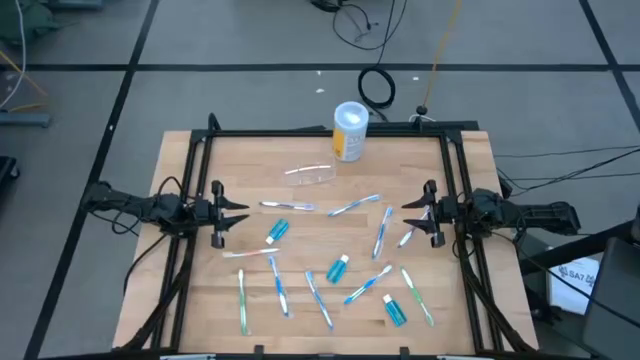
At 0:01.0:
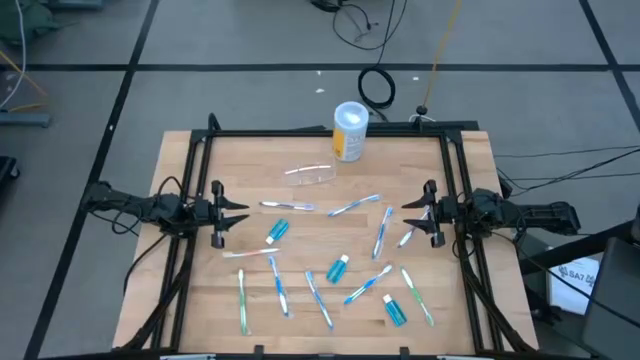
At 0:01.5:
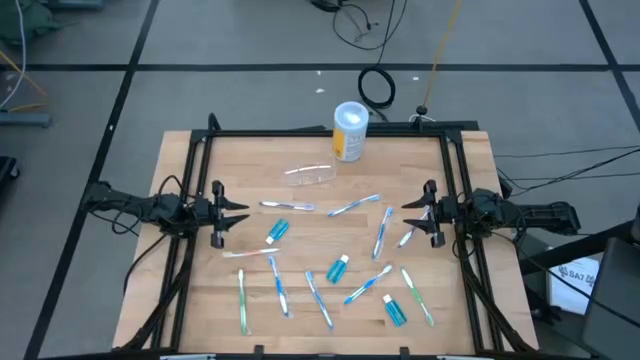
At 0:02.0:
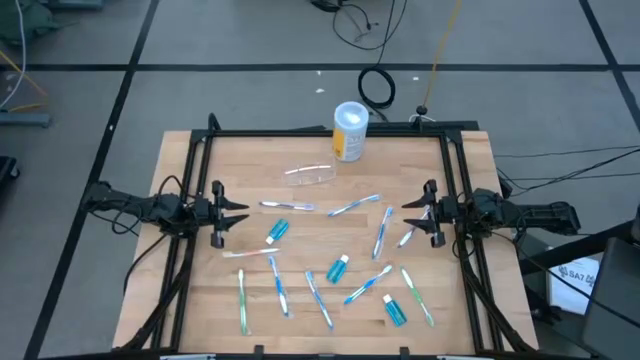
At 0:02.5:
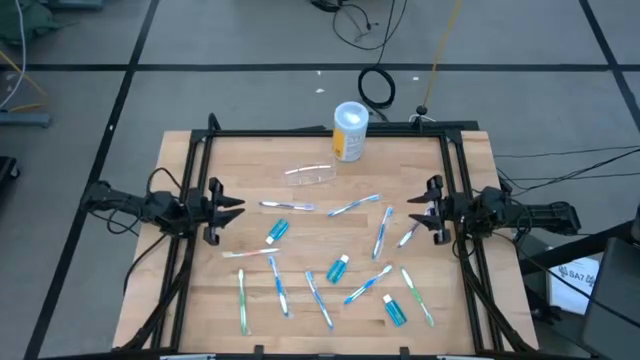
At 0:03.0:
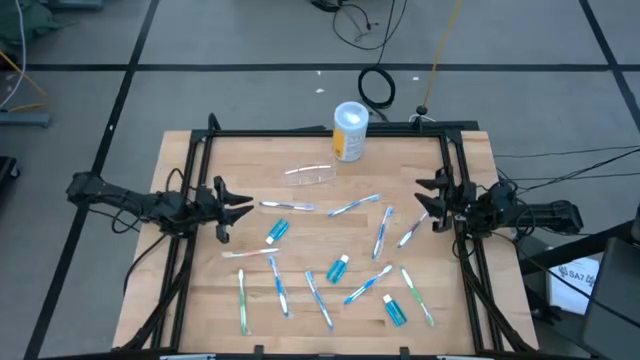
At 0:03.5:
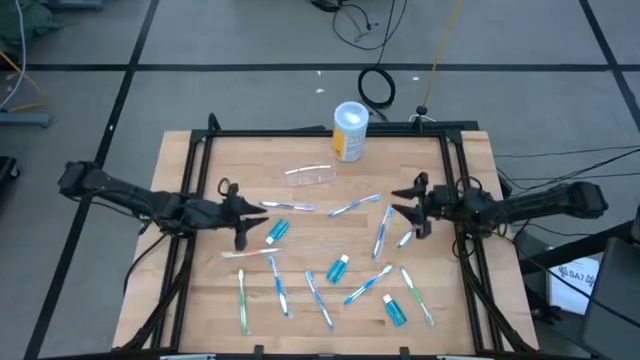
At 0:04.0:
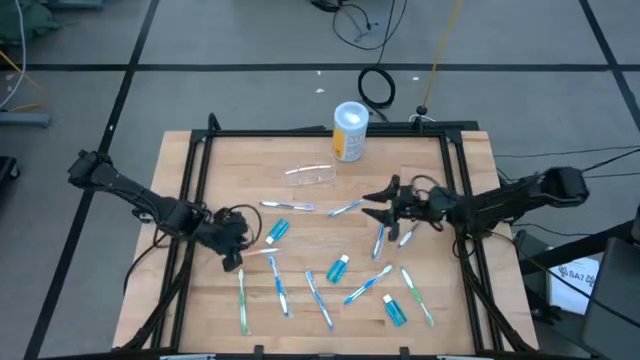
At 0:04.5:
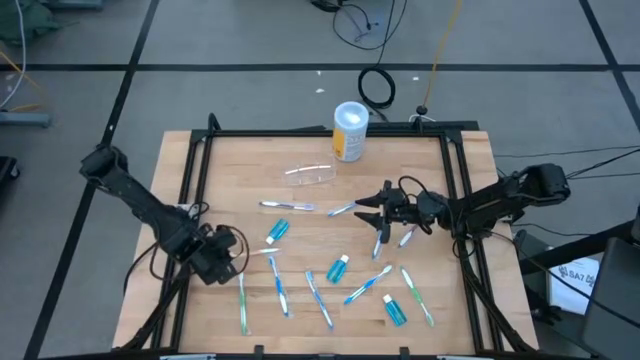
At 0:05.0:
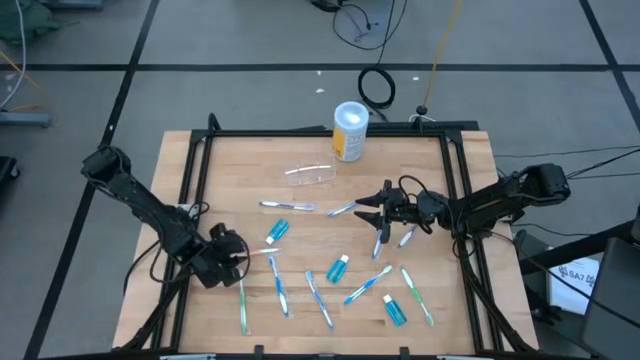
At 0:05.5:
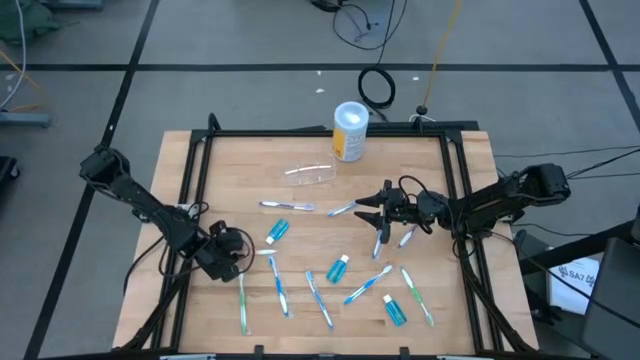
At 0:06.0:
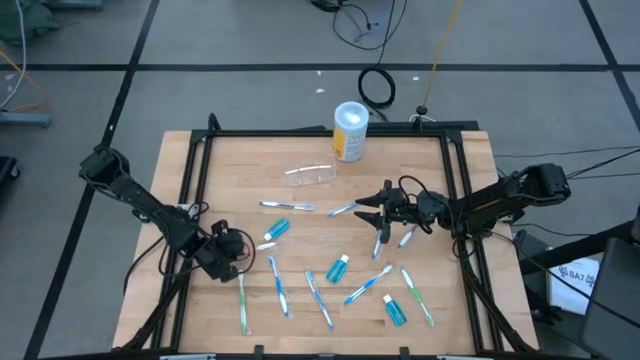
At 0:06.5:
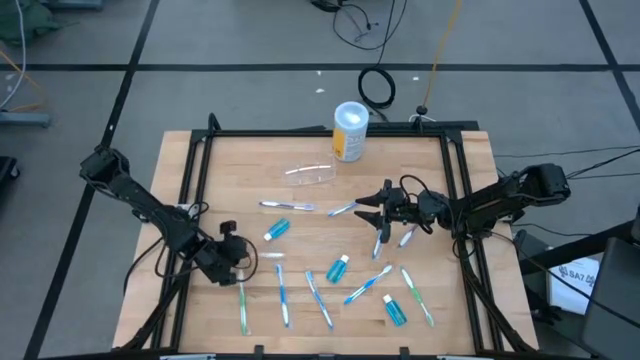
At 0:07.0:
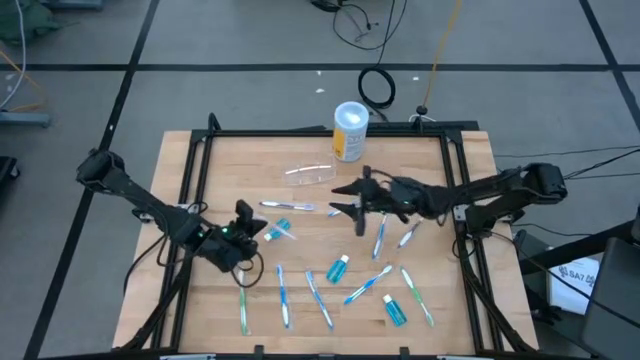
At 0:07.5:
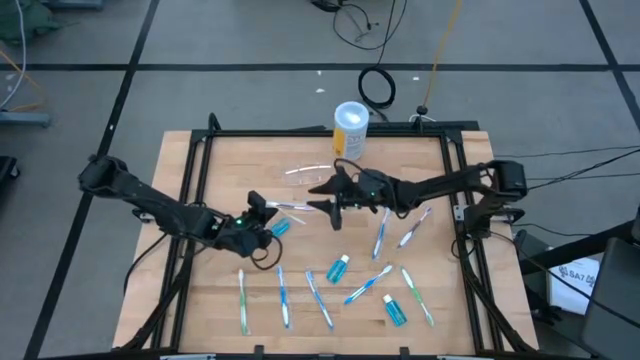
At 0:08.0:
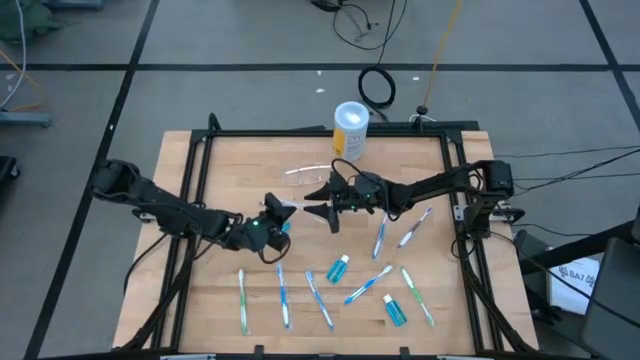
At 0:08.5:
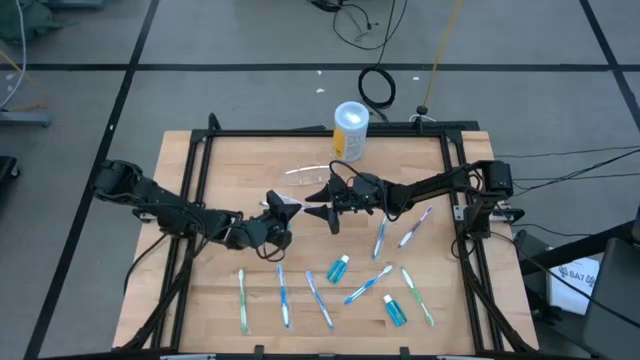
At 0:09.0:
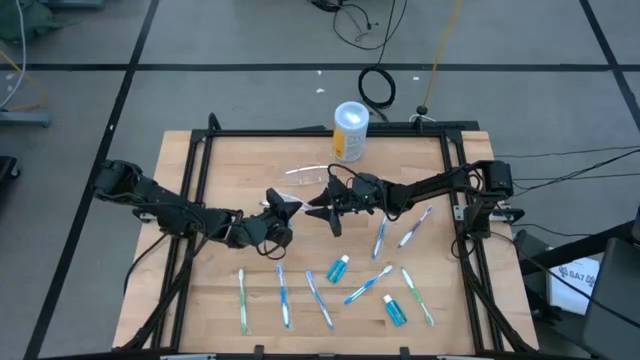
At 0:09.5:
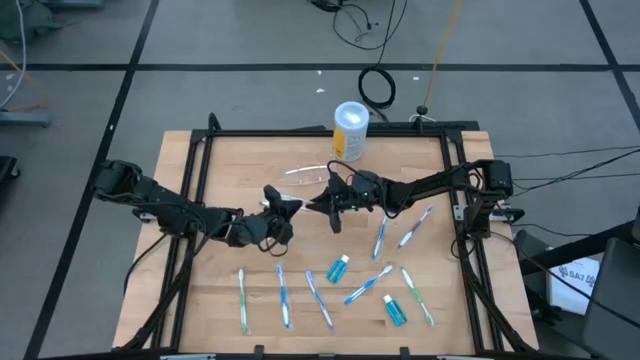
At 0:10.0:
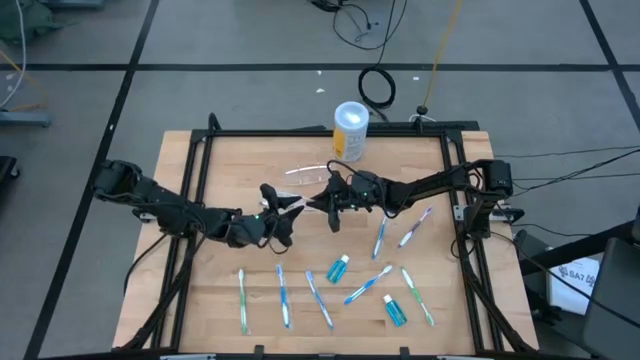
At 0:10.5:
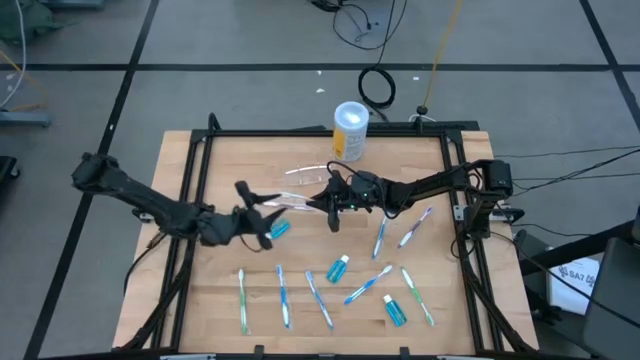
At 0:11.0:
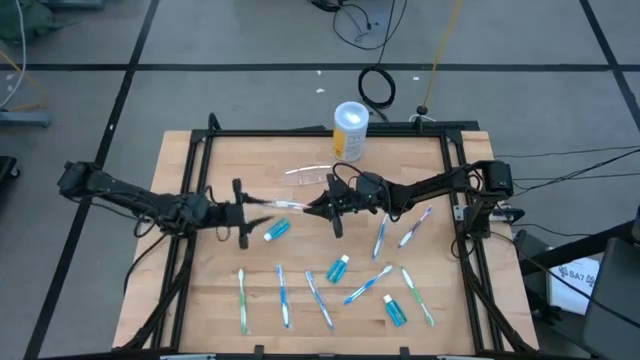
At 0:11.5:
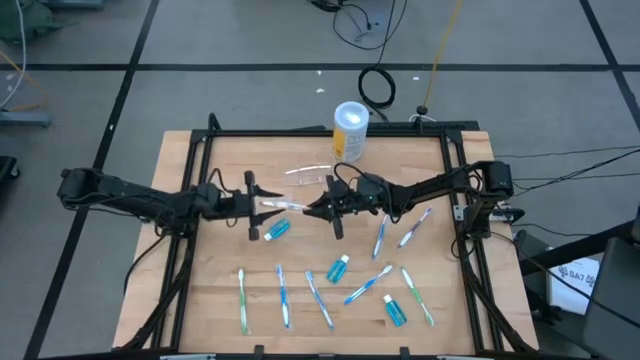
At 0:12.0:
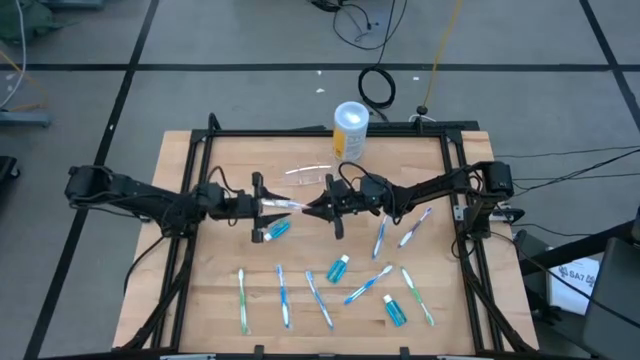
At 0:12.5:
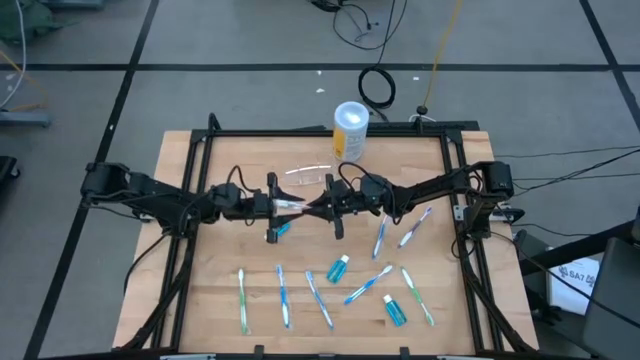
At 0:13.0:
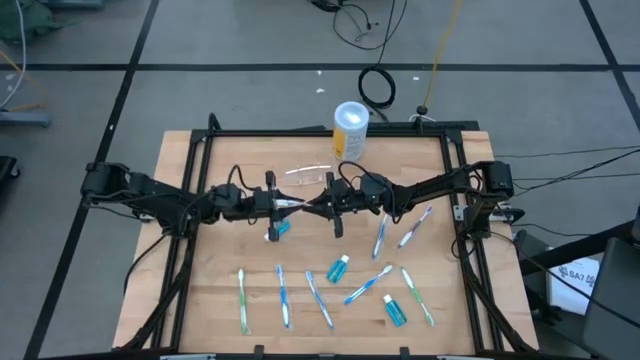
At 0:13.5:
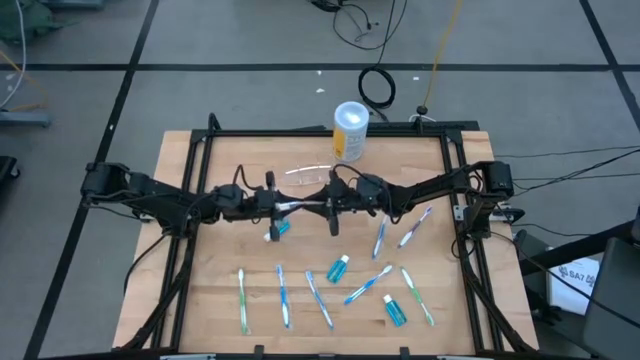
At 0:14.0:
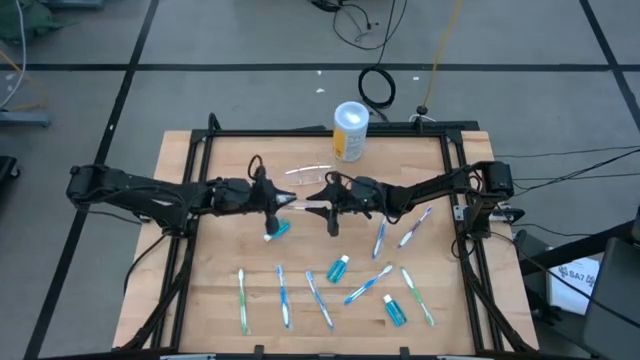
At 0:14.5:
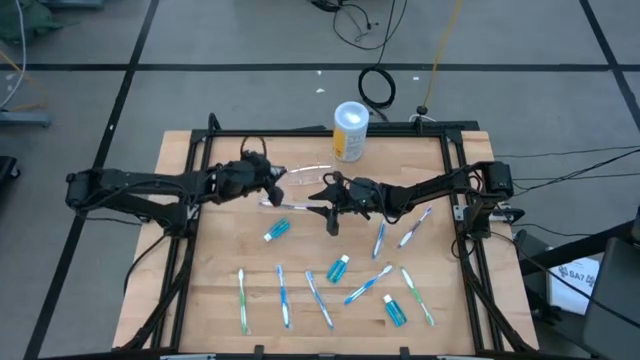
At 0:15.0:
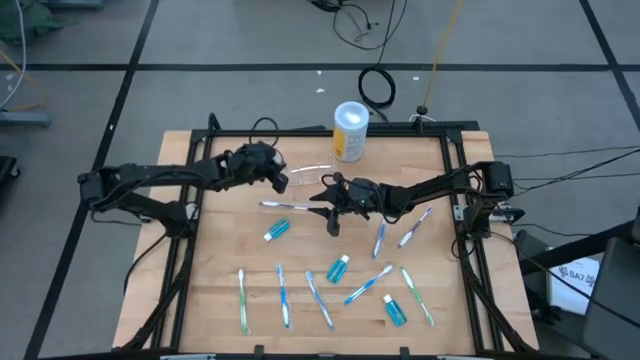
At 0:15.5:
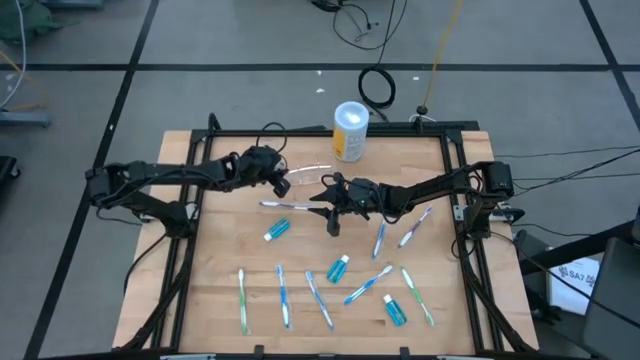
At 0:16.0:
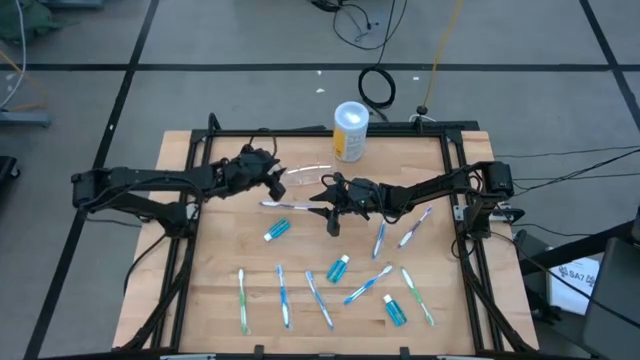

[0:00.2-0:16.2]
Task: Pick & Place toothbrushing station
Put the orange toothbrush into the left section of the transparent organizer
